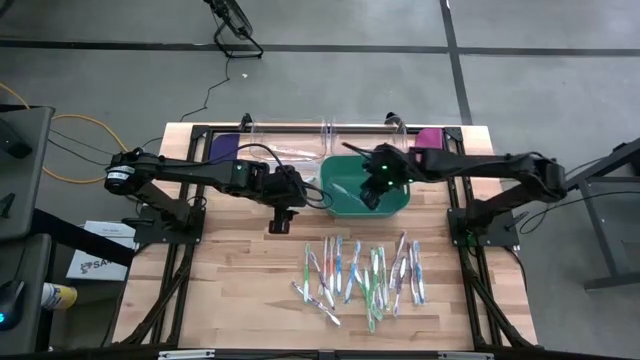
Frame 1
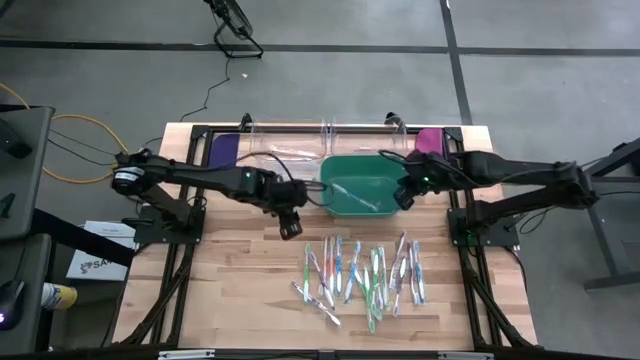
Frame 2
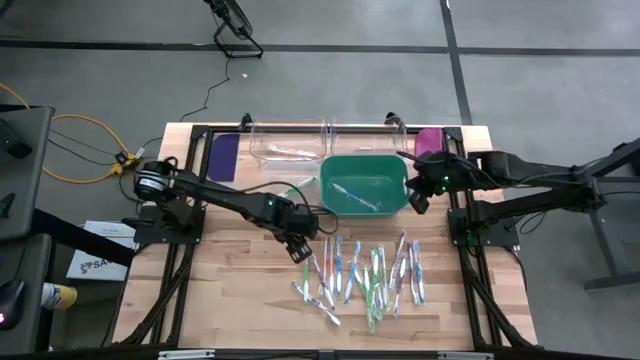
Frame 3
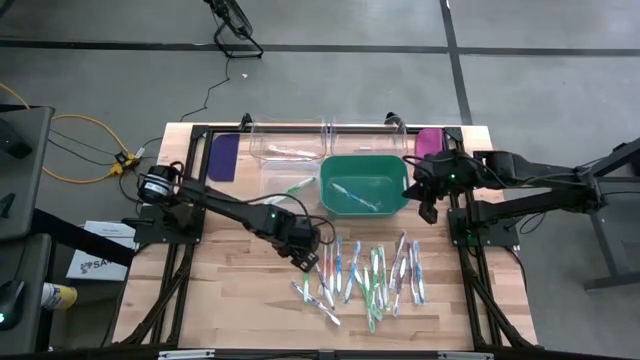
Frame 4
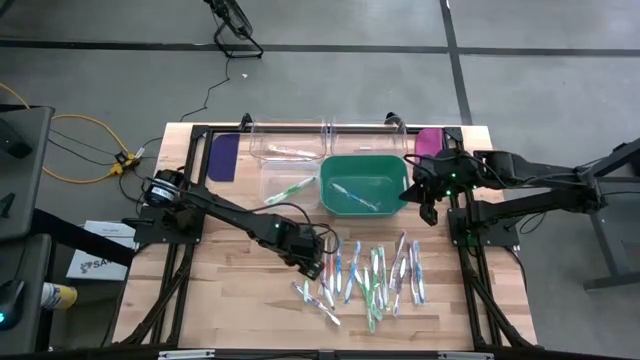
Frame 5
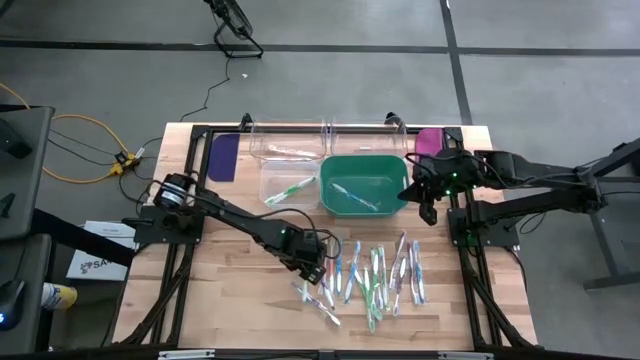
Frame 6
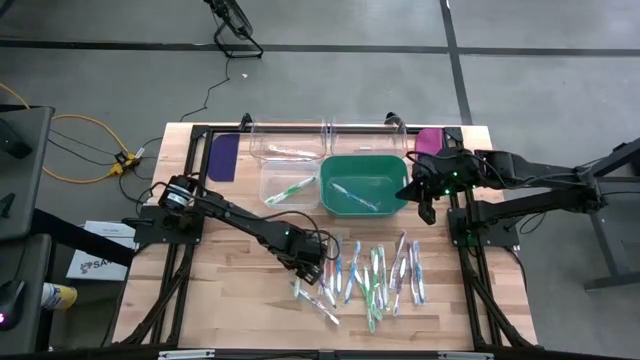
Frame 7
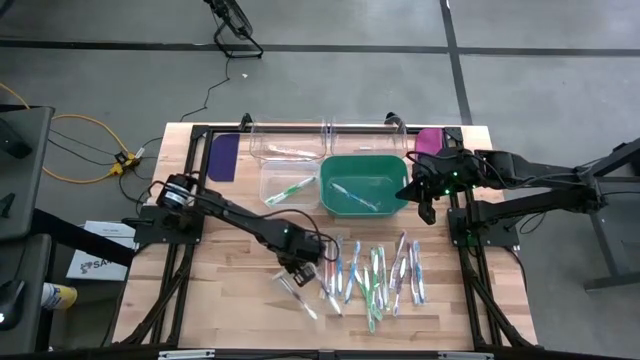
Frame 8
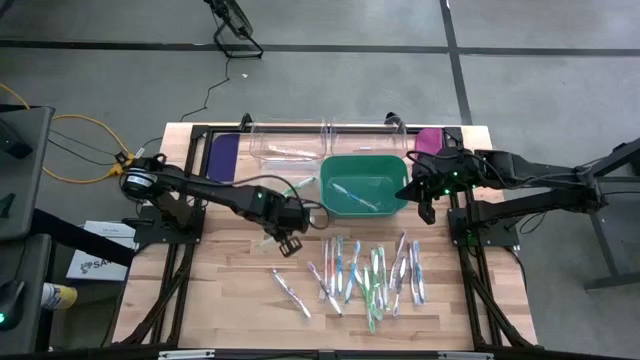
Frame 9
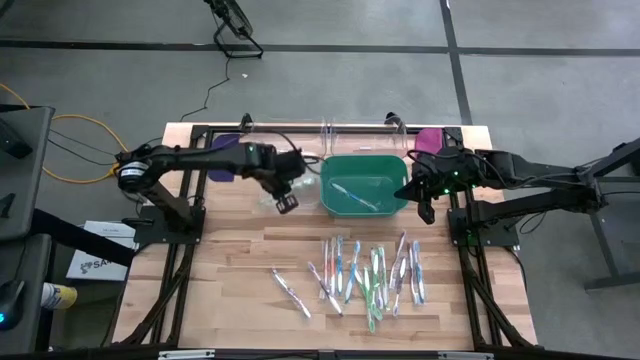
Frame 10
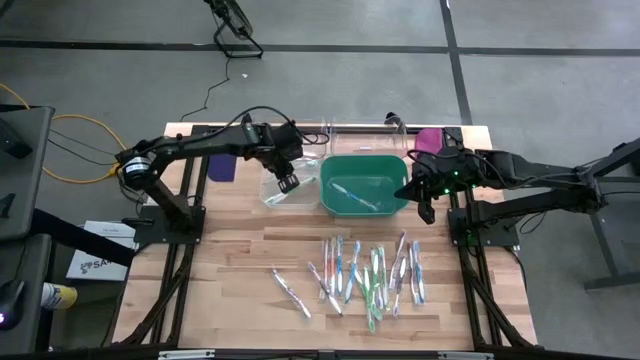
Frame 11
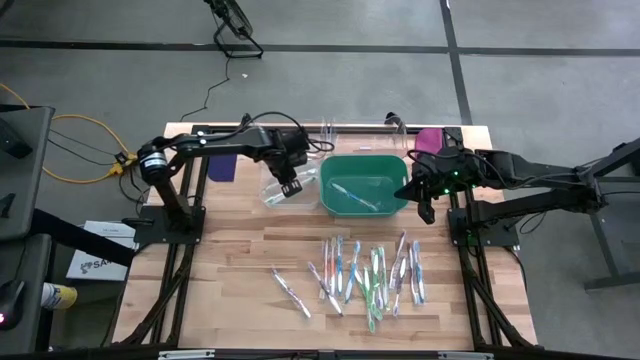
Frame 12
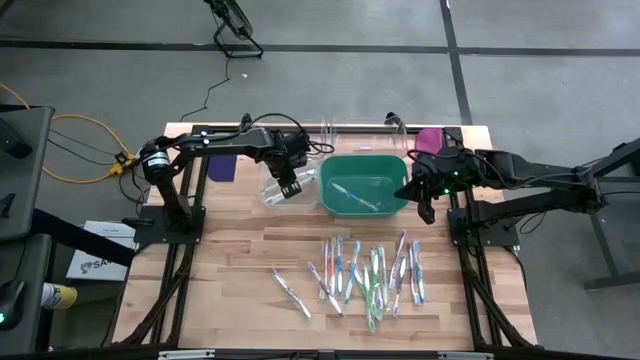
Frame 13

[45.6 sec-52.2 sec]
Task: Pick & Place Toothbrushes
Put the green toothbrush into the white bin

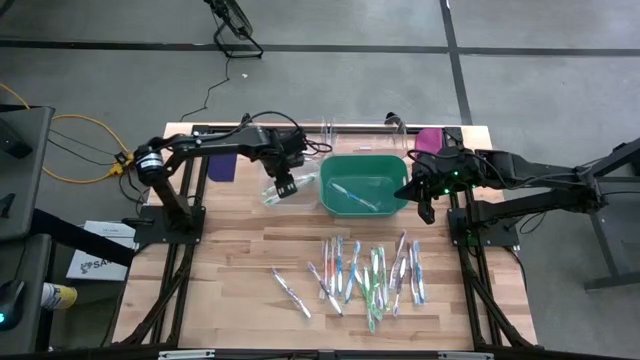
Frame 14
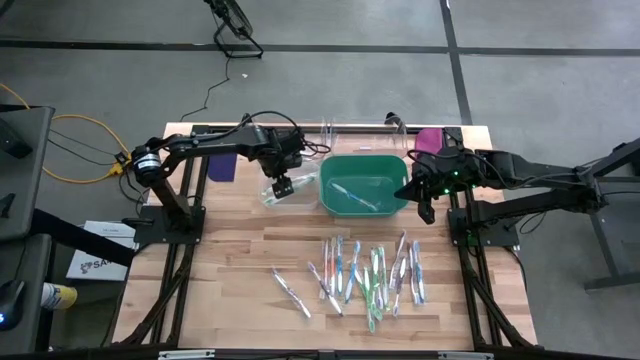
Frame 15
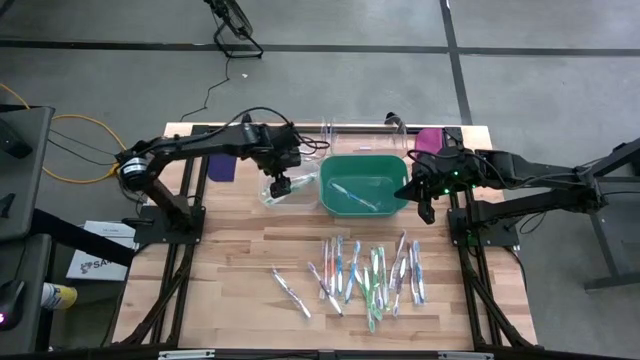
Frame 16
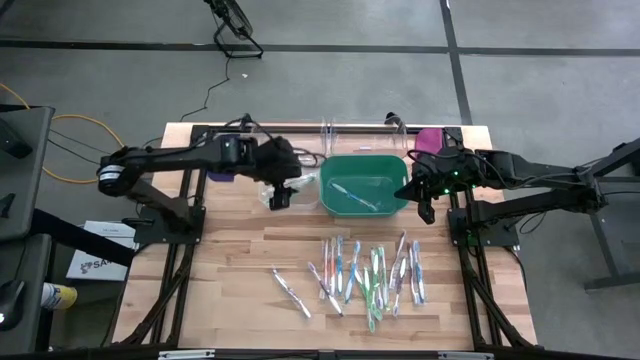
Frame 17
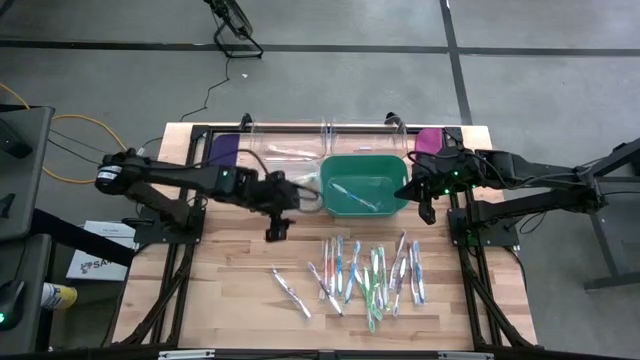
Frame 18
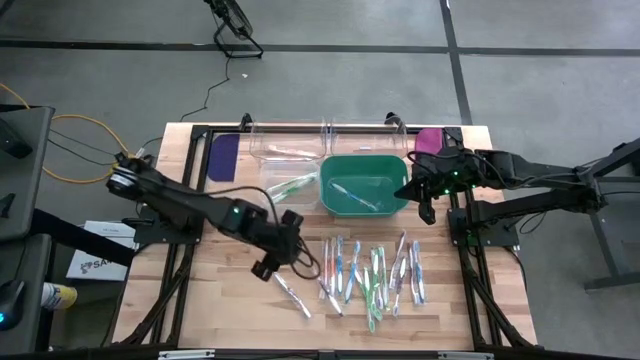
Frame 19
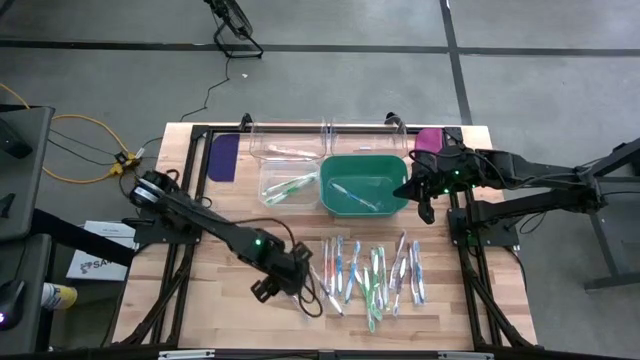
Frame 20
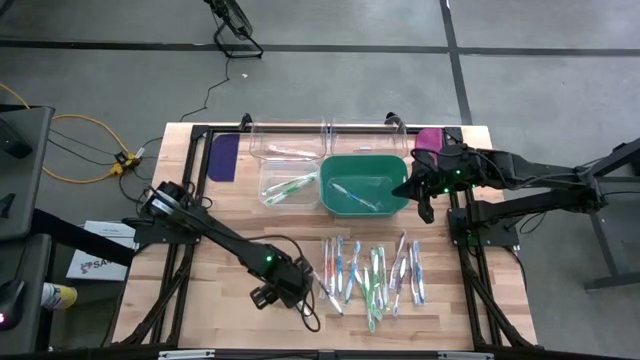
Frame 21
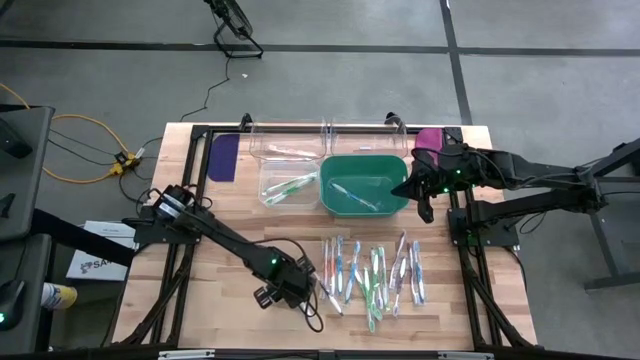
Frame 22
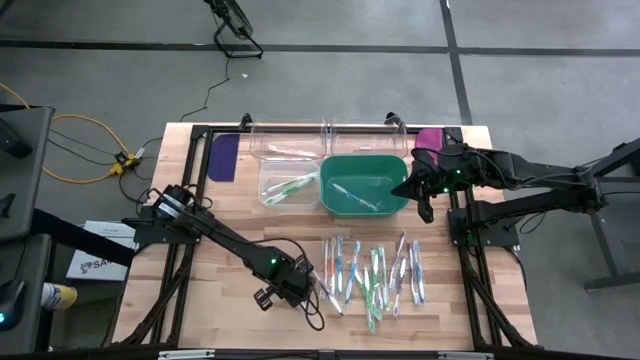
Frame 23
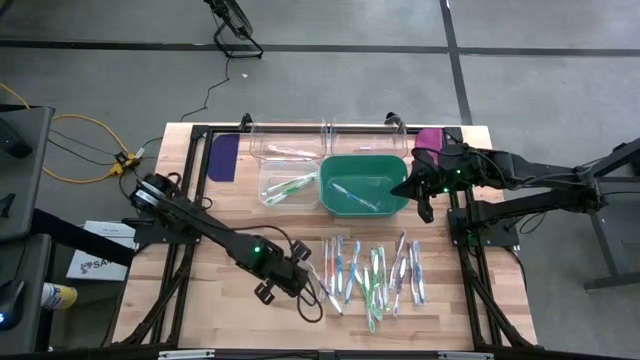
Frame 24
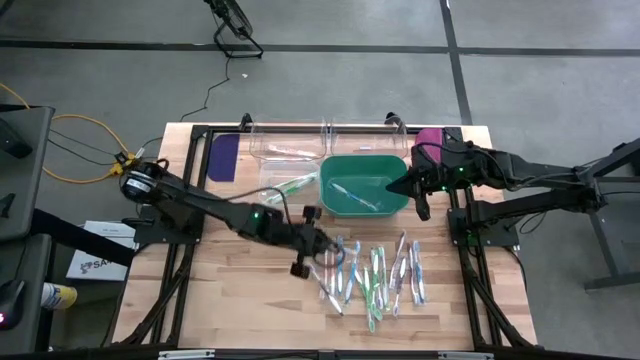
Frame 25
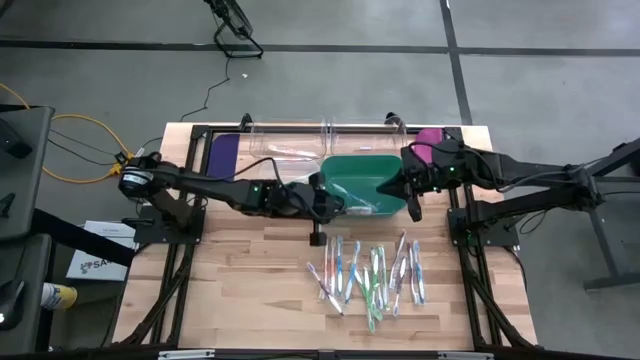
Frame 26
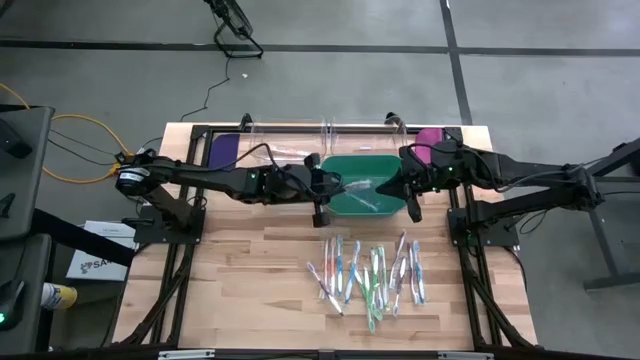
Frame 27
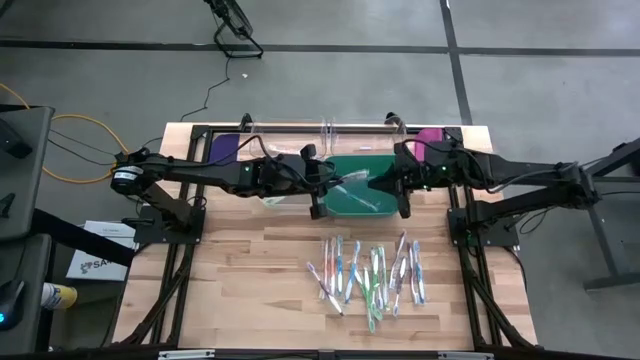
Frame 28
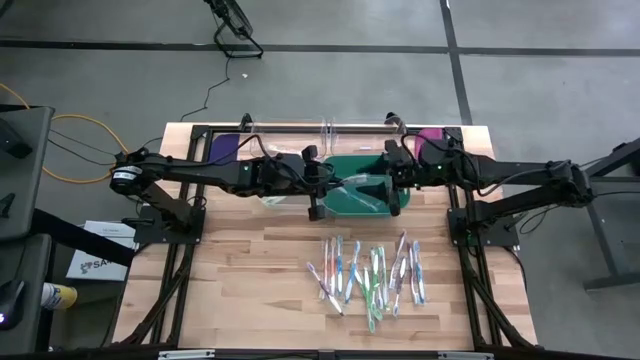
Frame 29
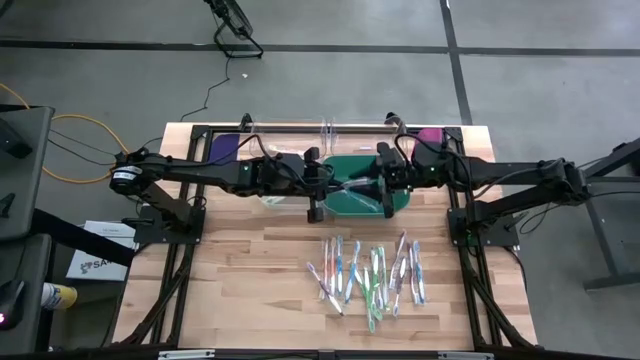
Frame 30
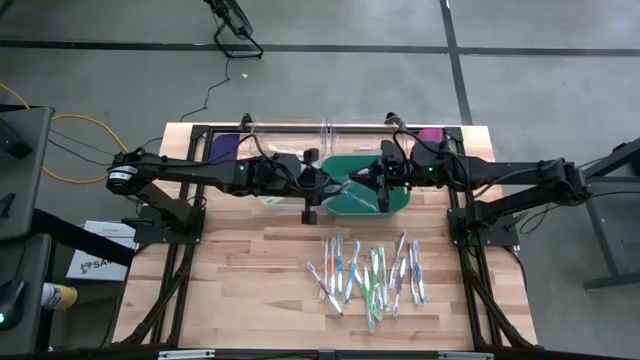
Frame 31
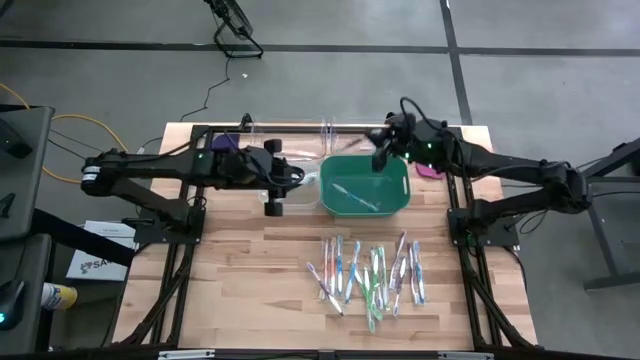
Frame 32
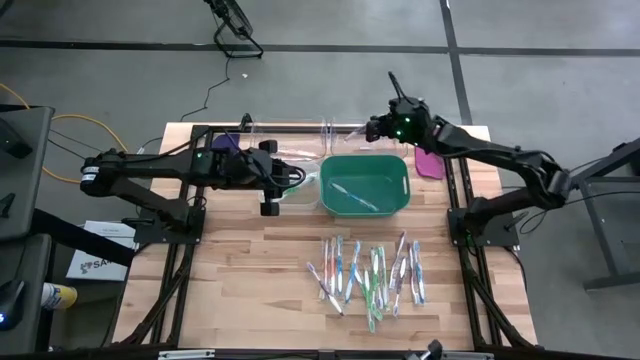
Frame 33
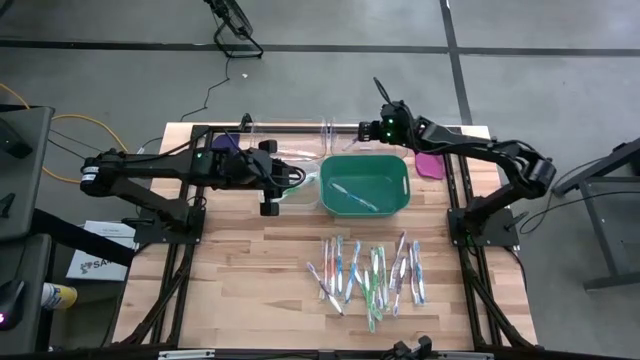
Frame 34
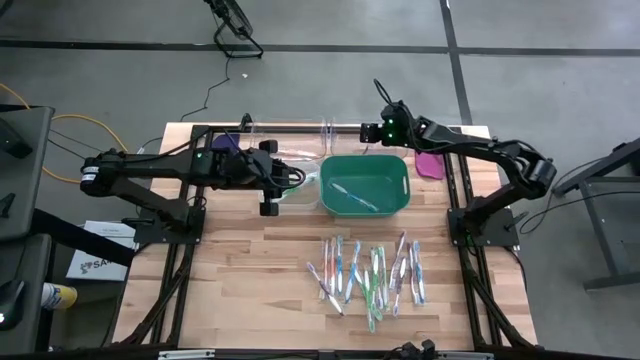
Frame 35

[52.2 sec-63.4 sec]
Put the purple toothbrush into the right transparent bin

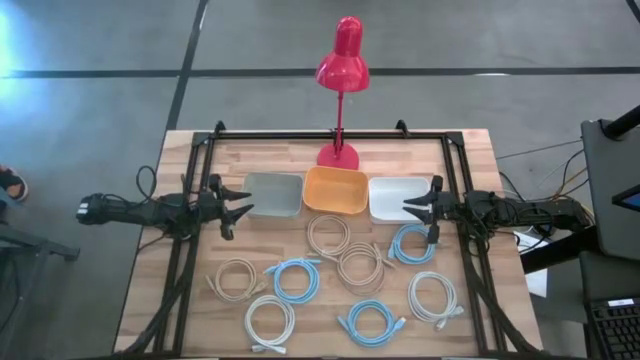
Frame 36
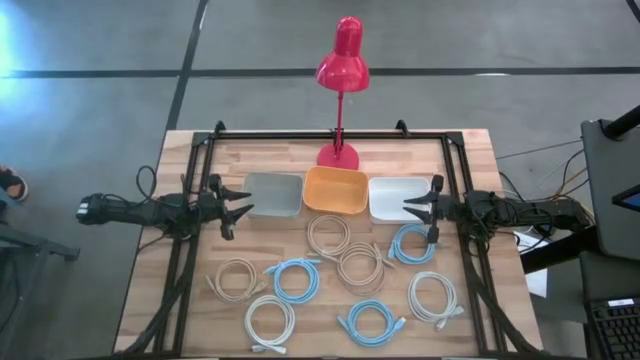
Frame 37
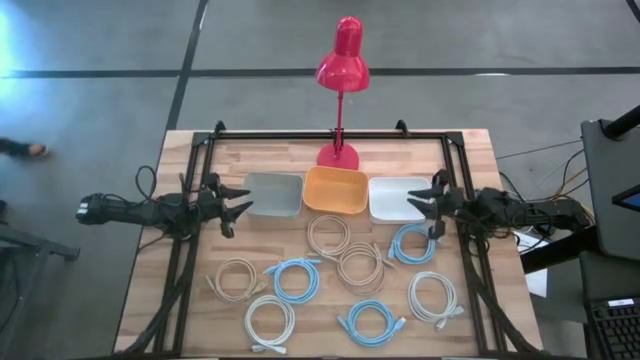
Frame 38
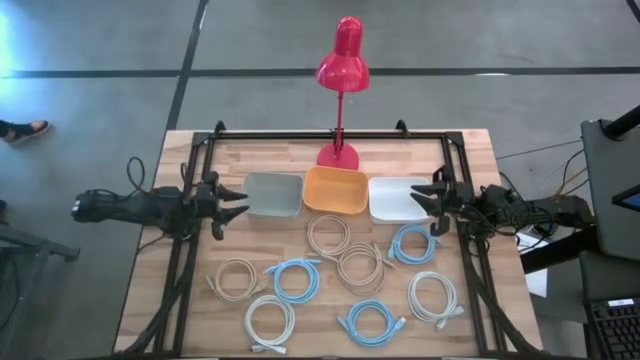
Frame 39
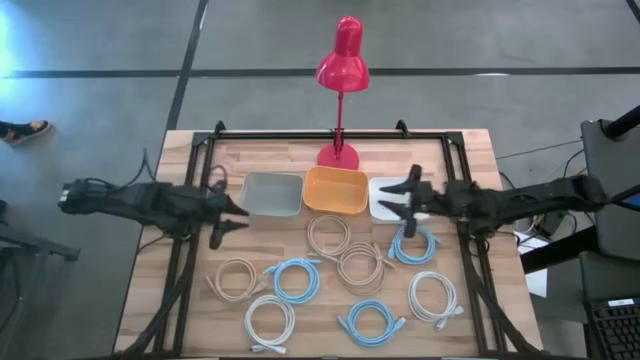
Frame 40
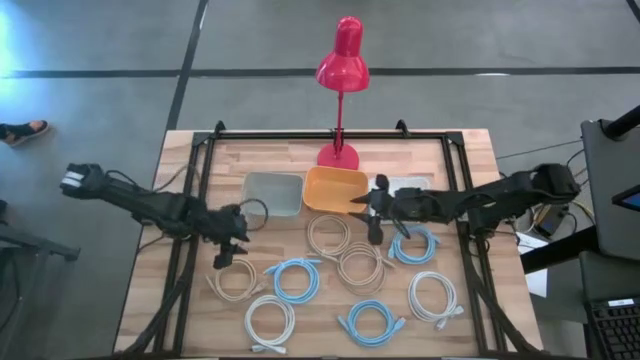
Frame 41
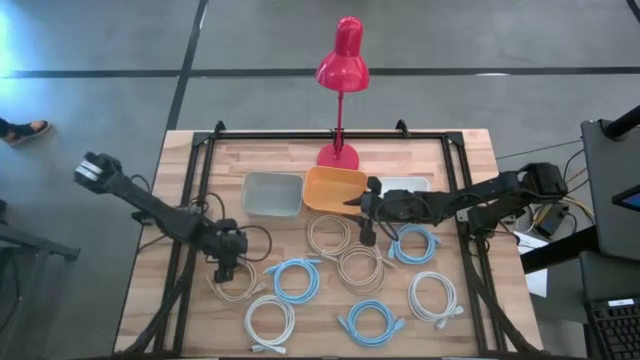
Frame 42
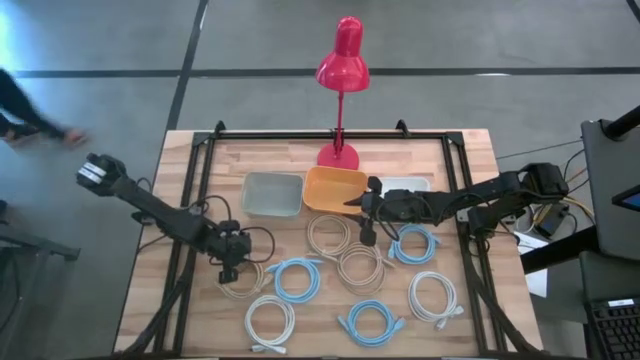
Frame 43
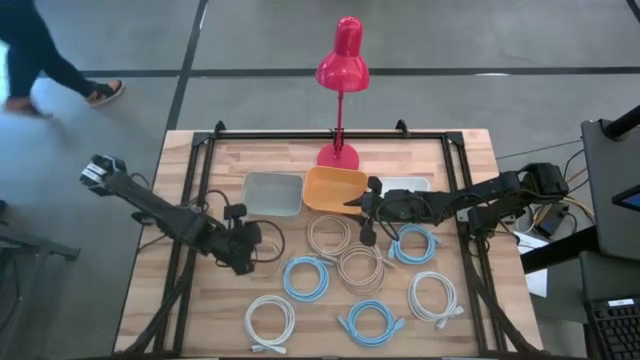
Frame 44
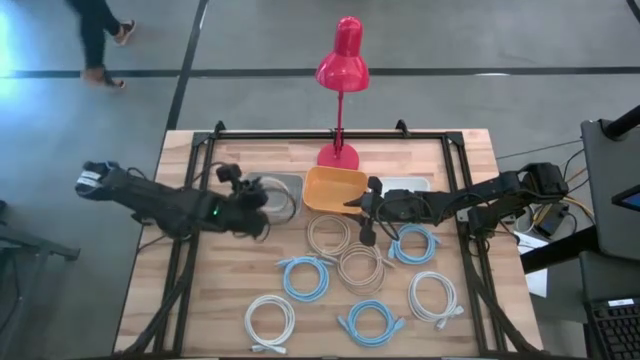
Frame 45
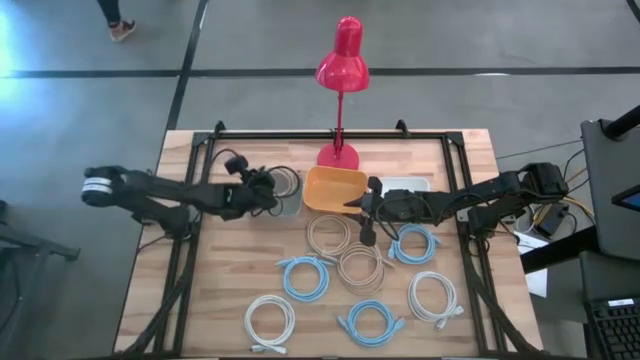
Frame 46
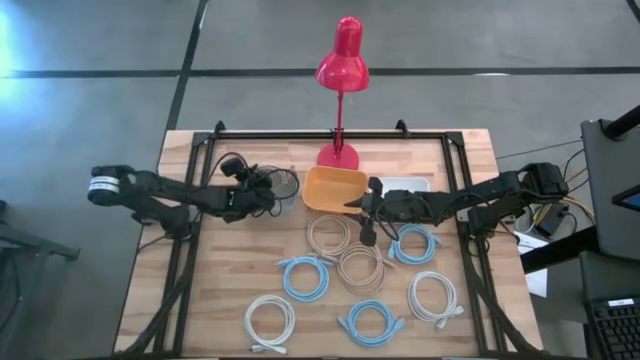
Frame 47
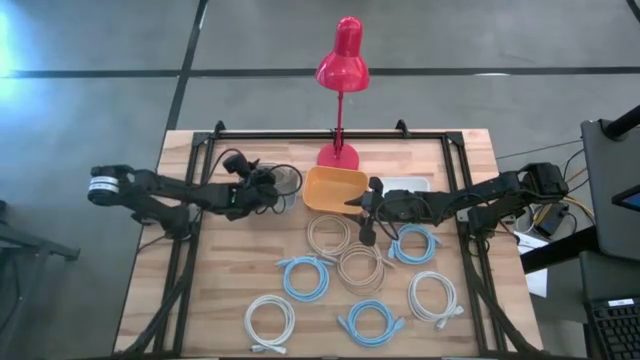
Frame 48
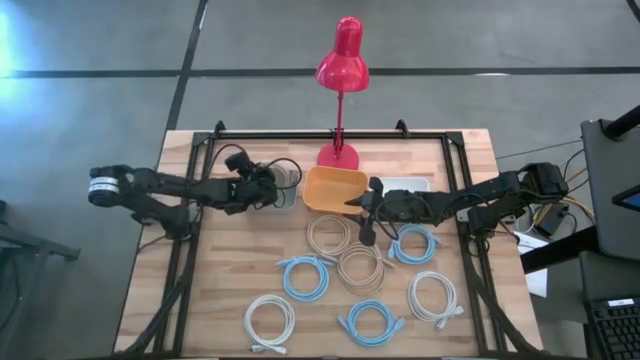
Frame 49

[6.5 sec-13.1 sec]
Task: Sort HDMI cables
Put the bottom left brown hdmi cable into the gray bin
